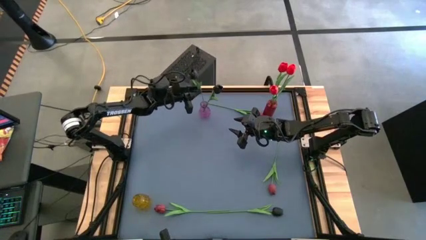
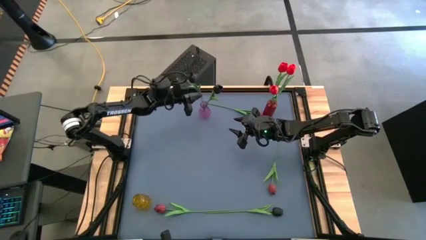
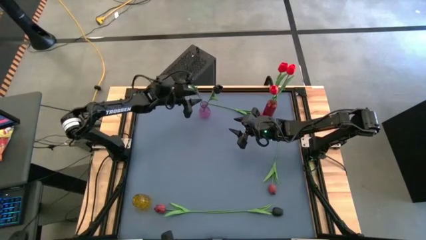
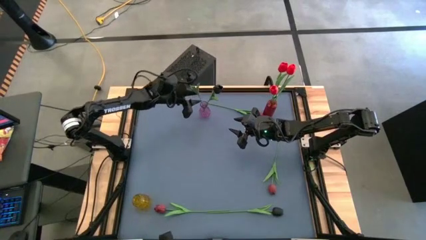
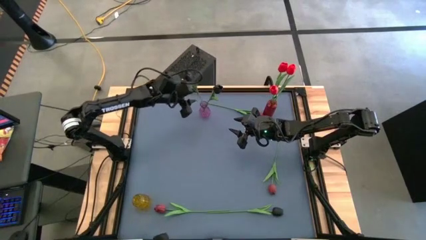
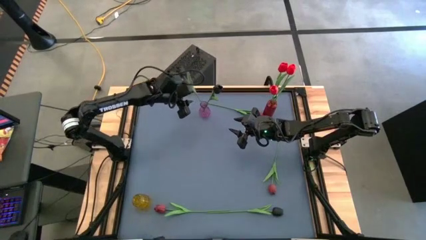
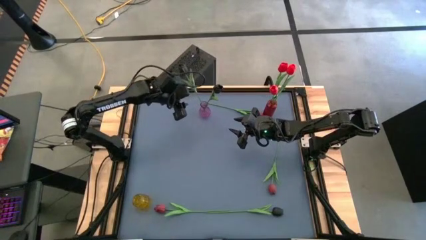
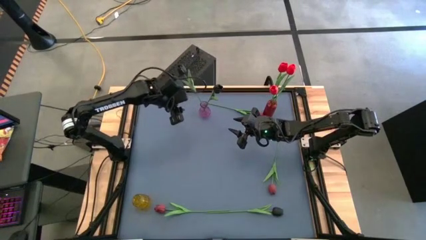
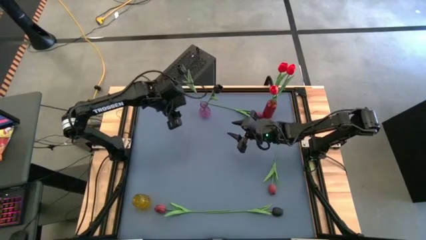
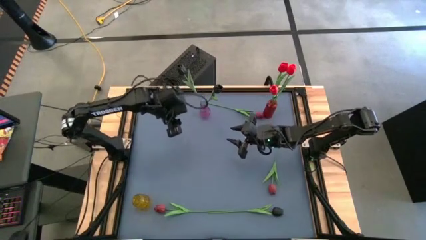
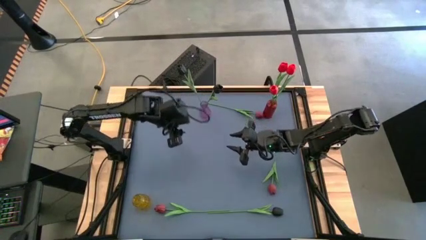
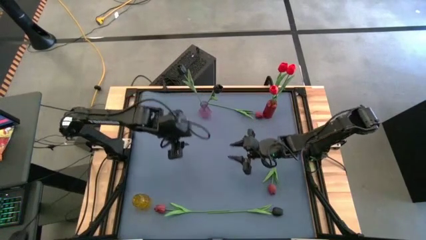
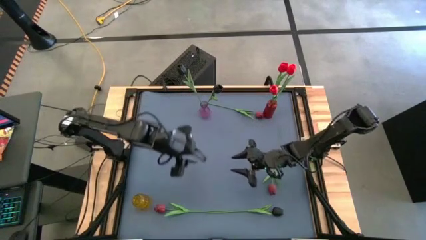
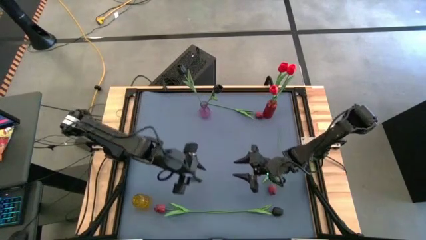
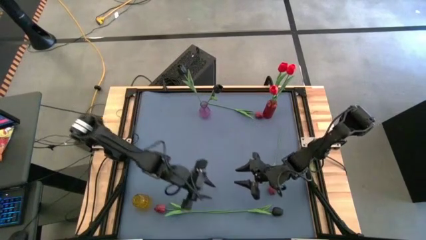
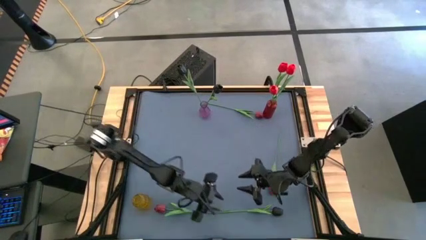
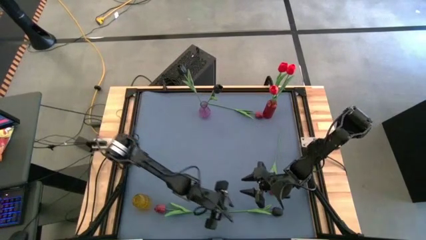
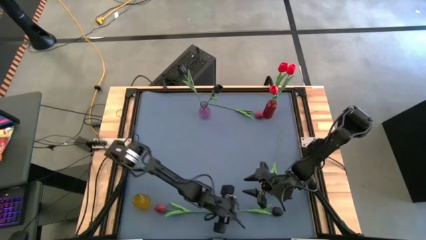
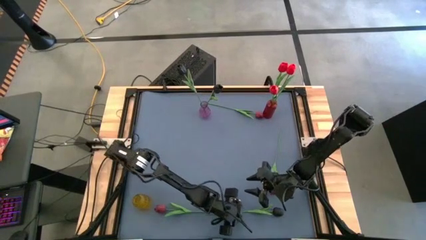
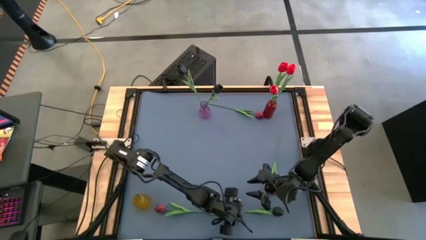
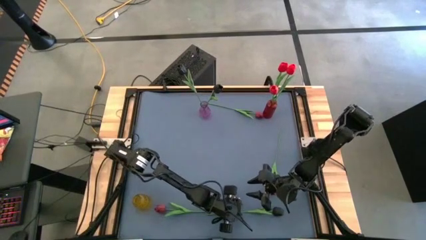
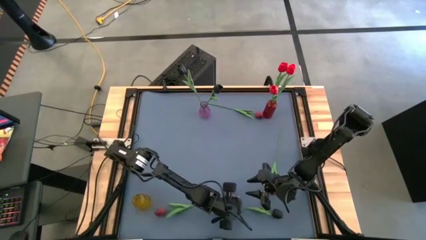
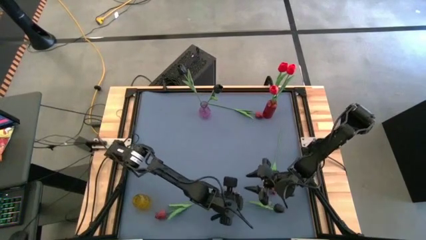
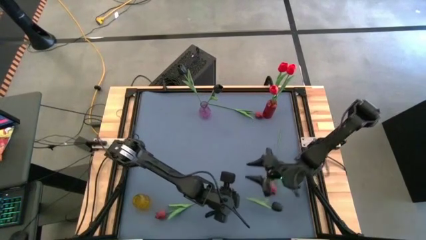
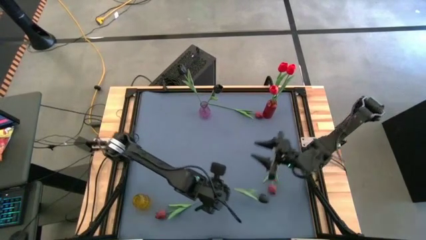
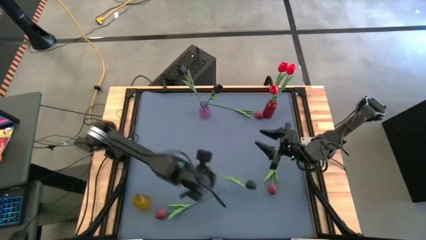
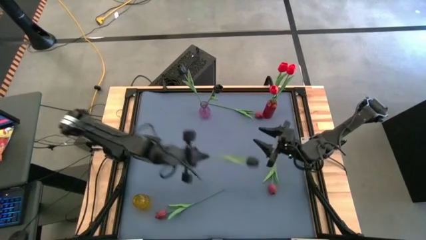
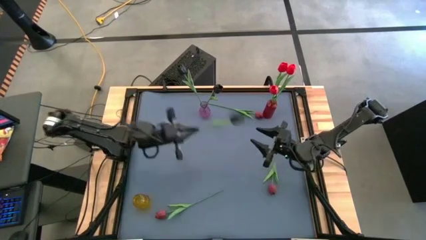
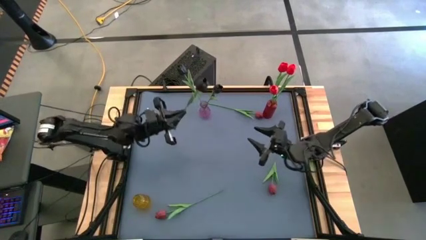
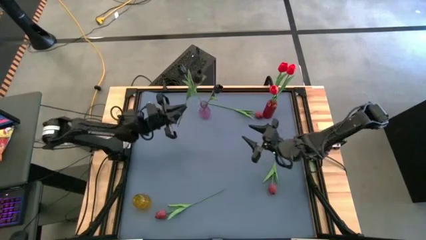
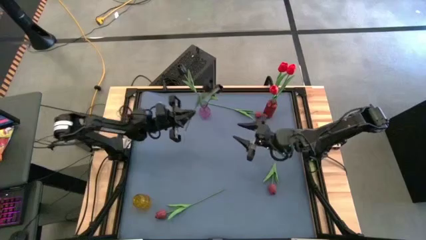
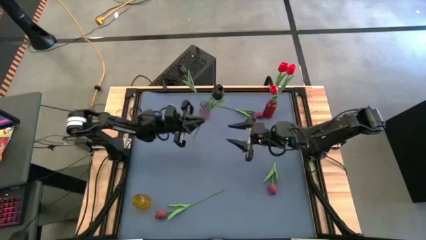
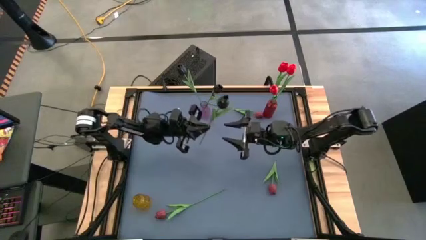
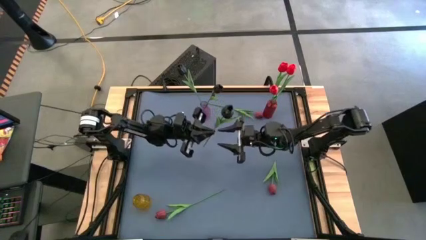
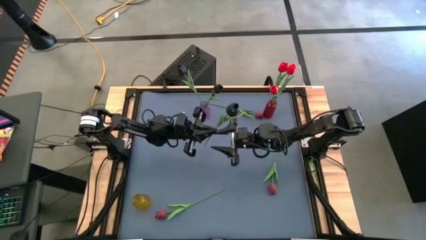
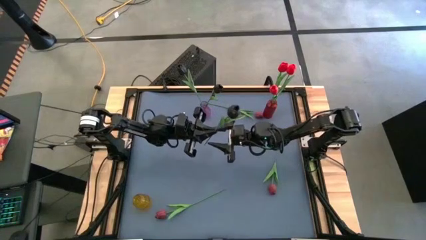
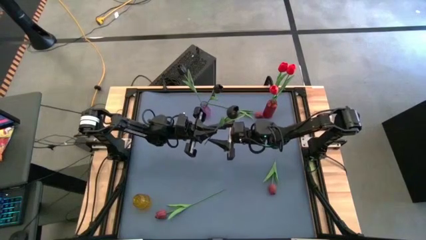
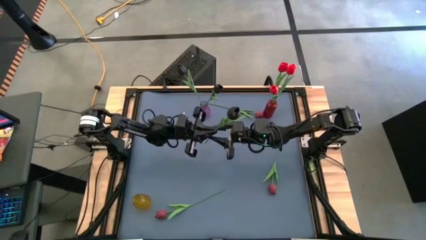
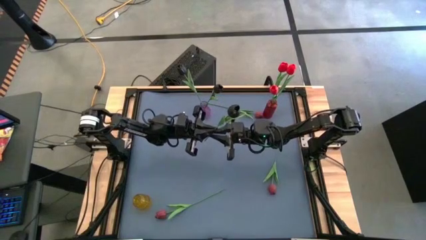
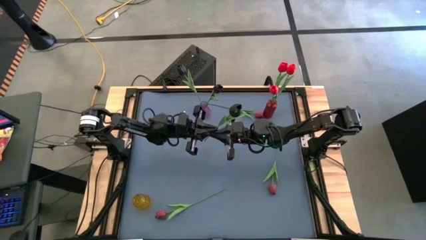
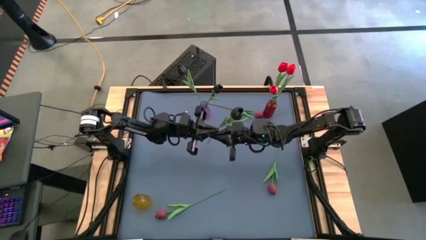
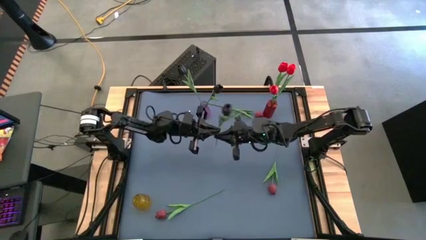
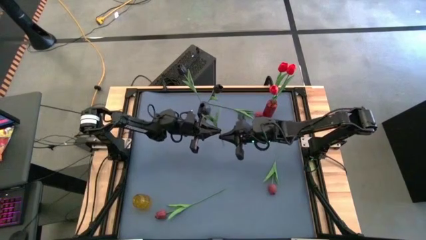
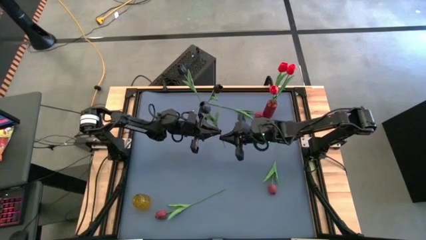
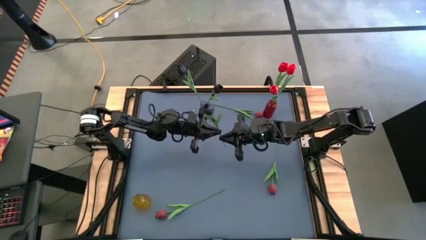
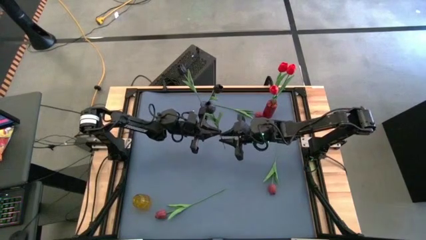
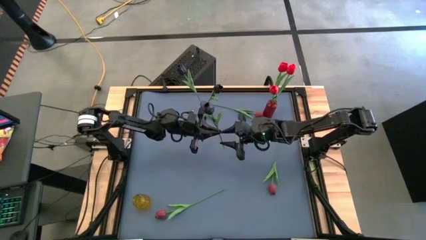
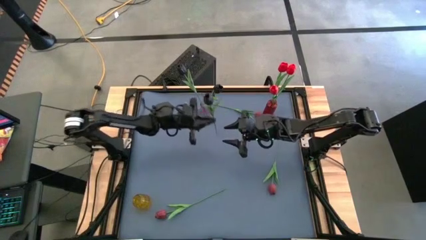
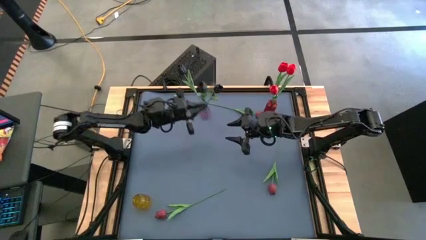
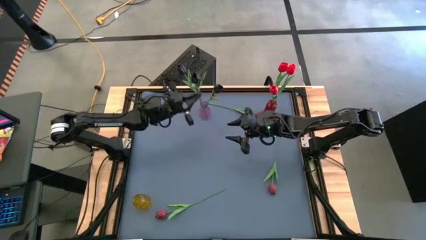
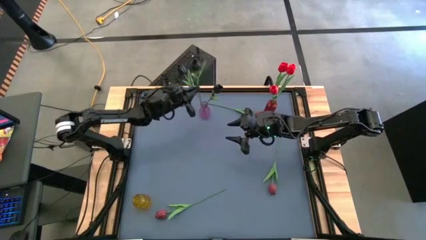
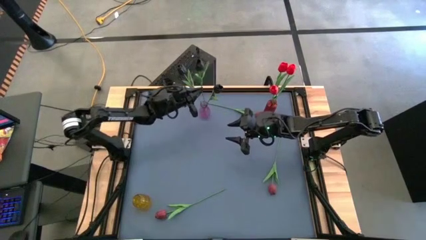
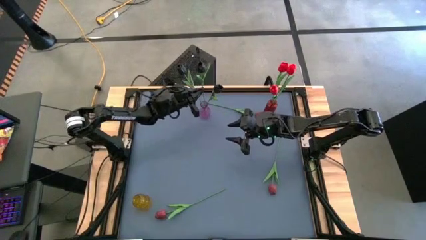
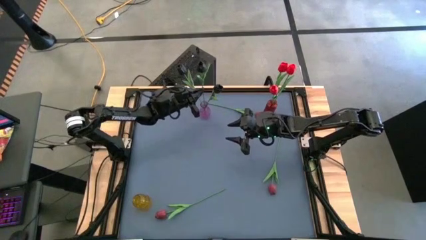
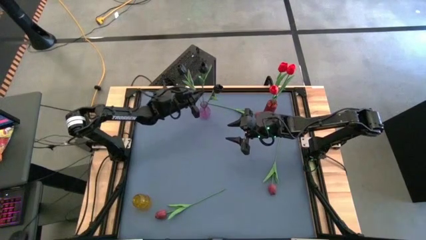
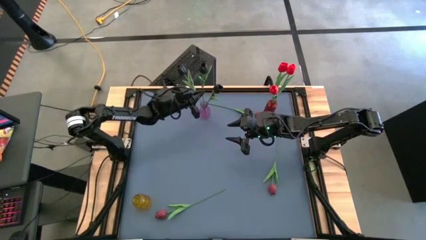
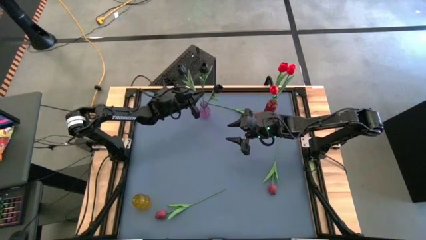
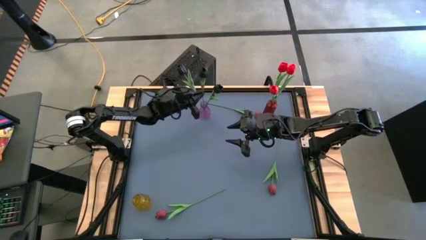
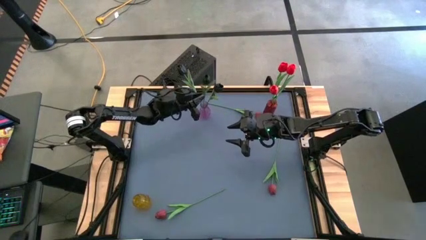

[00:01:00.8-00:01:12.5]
Task: Sort flowers into vase by color
Put the black flower into the violet vase

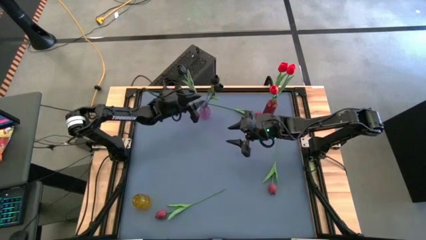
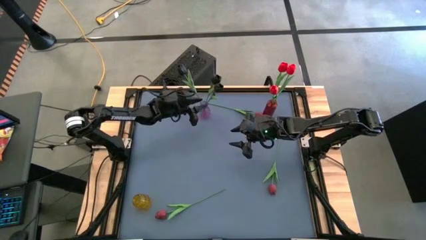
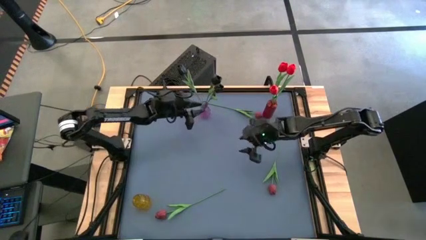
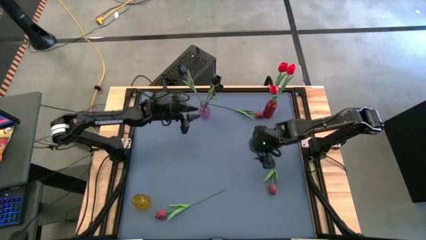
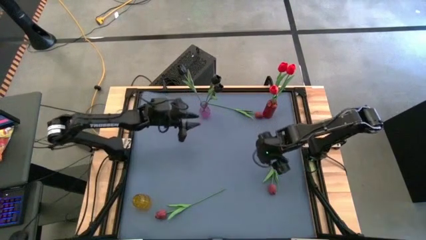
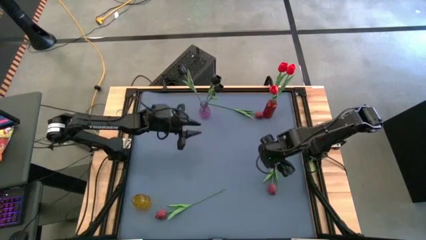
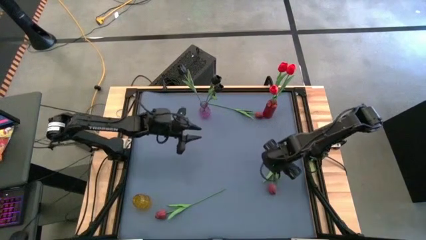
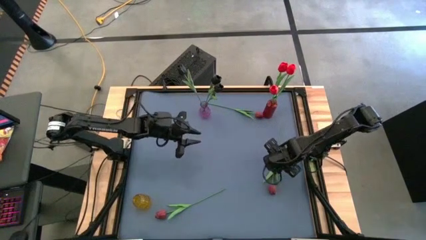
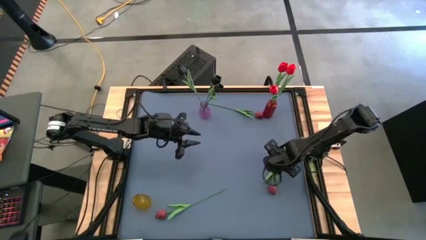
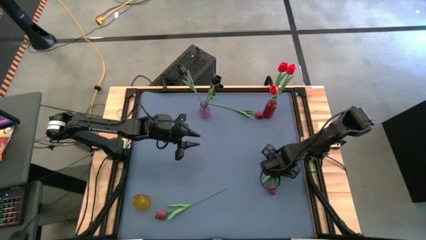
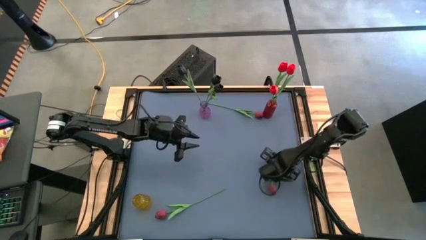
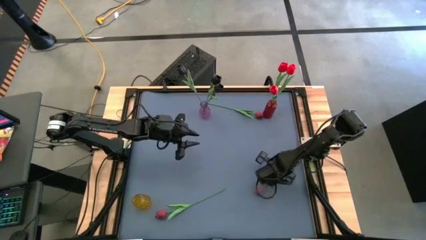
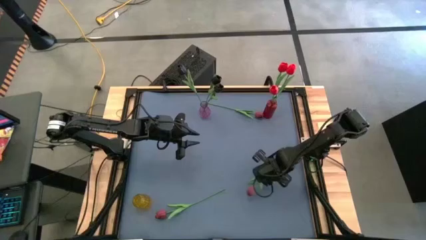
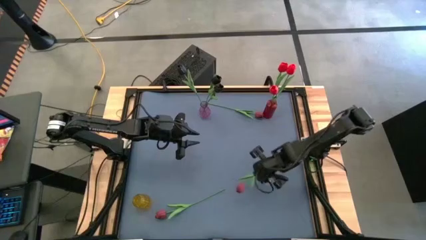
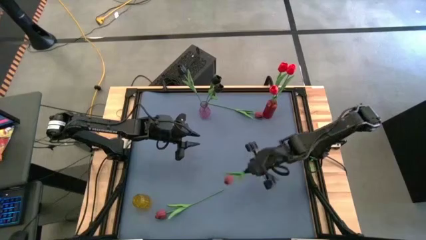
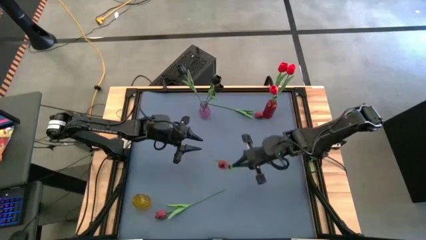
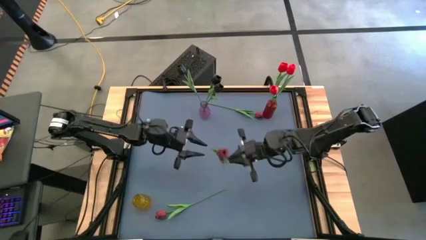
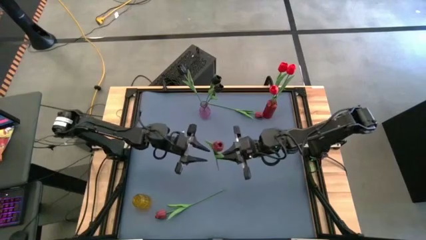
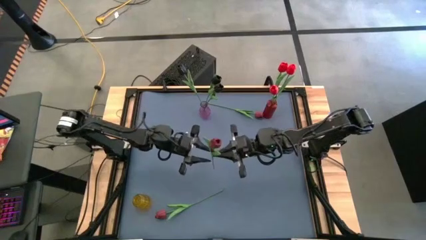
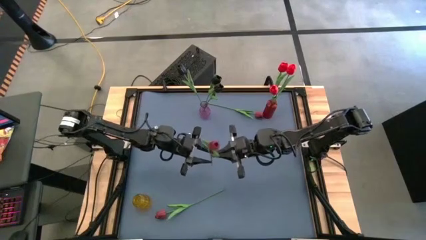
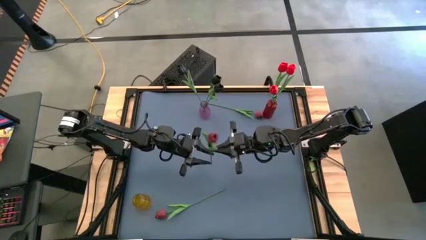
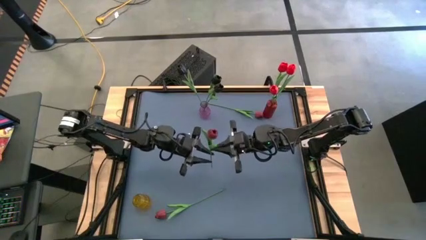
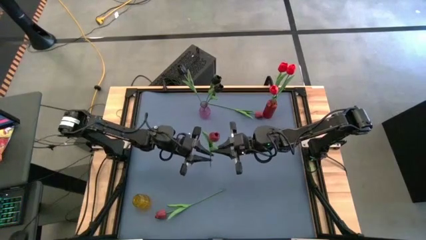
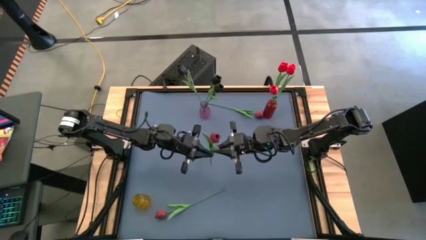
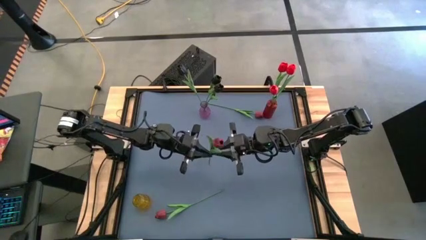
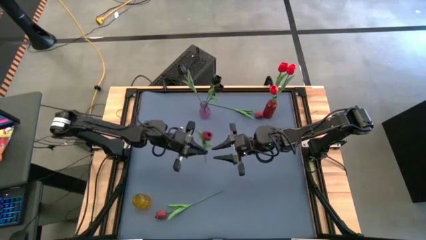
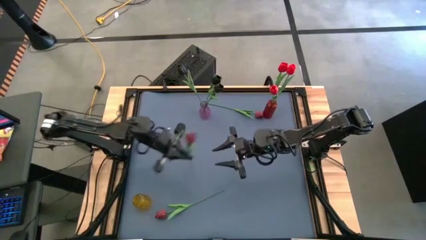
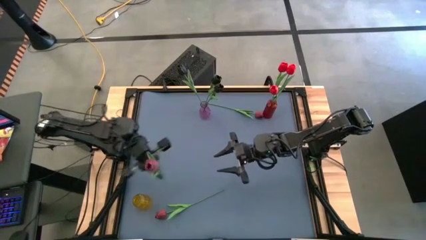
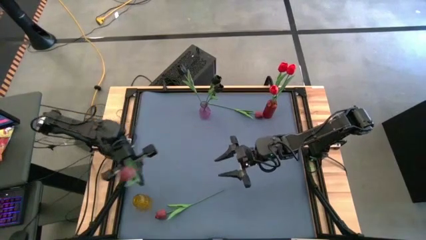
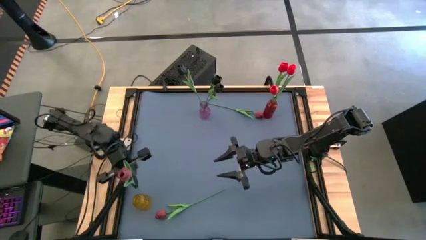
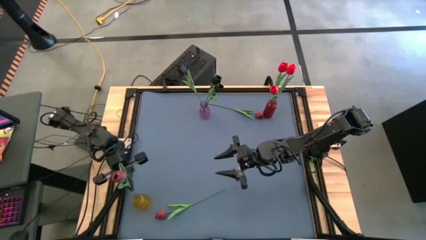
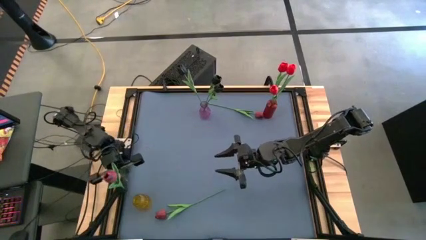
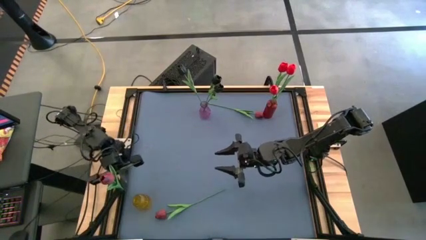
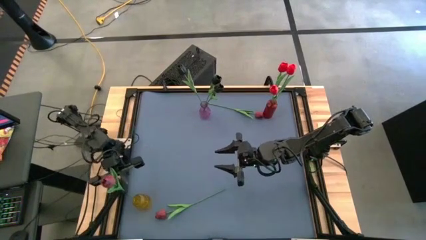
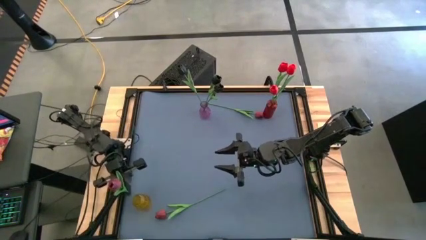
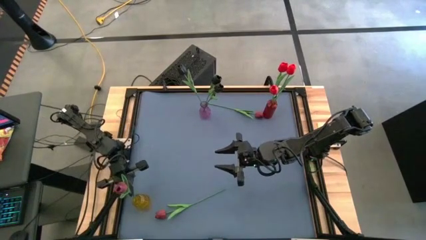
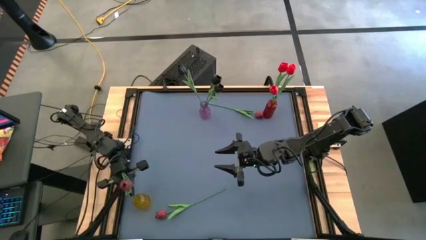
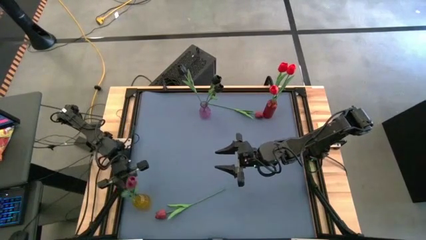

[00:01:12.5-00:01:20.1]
Put the middle dark red flower into the yellow vase
